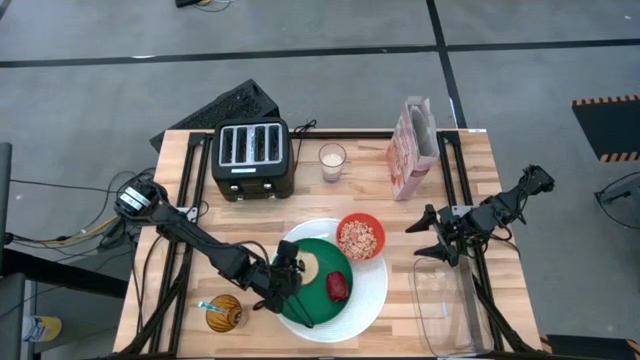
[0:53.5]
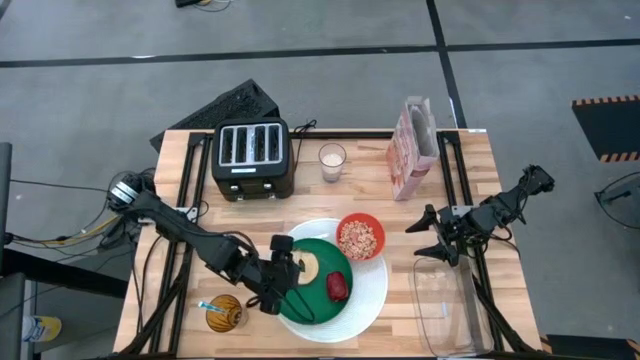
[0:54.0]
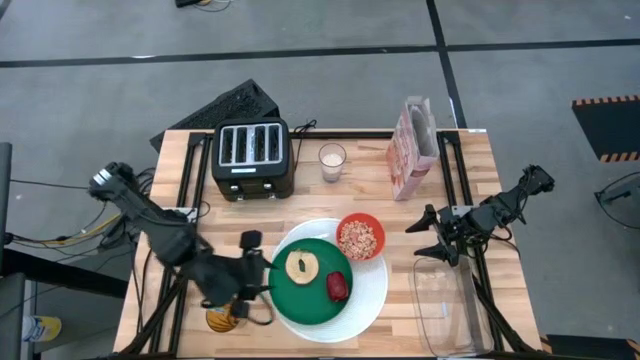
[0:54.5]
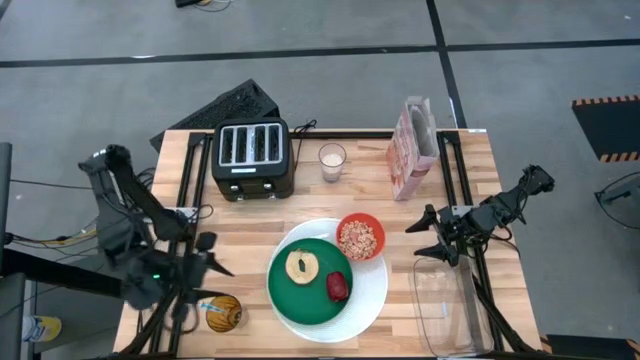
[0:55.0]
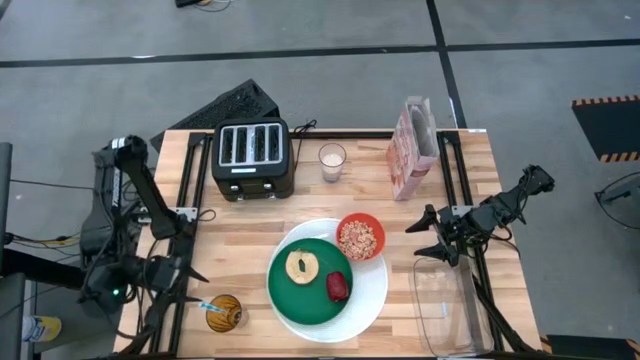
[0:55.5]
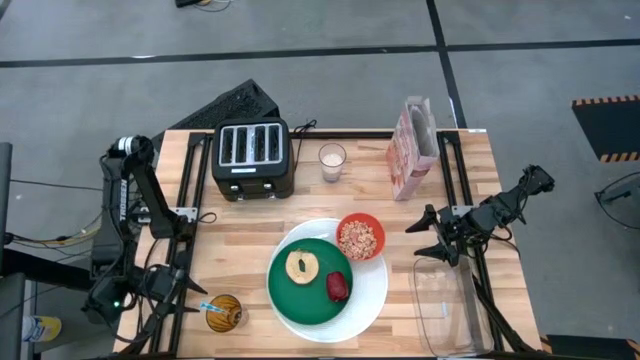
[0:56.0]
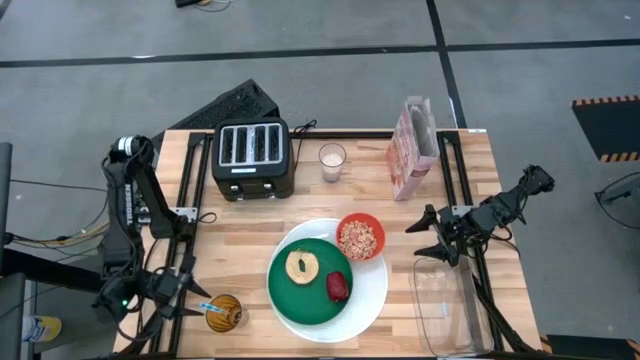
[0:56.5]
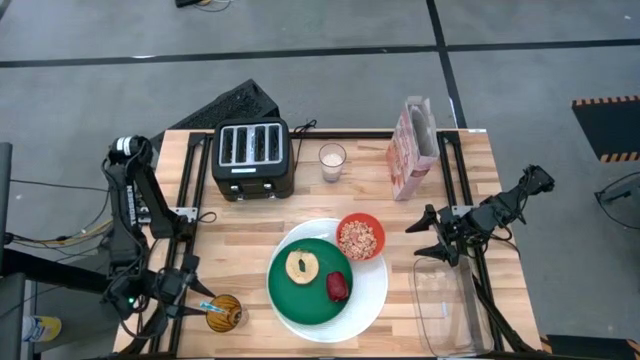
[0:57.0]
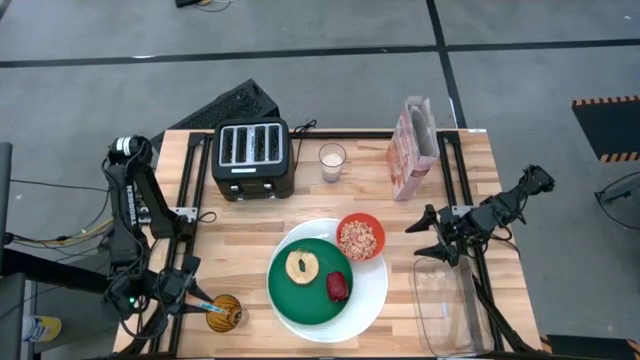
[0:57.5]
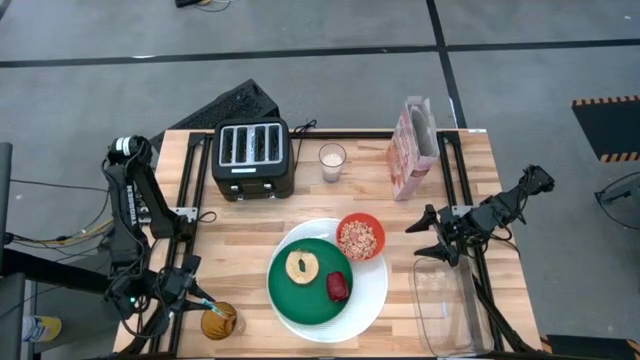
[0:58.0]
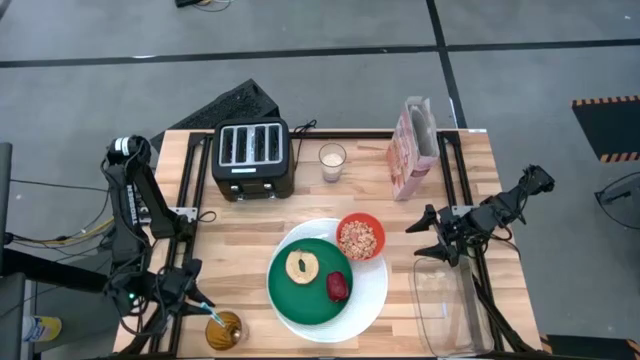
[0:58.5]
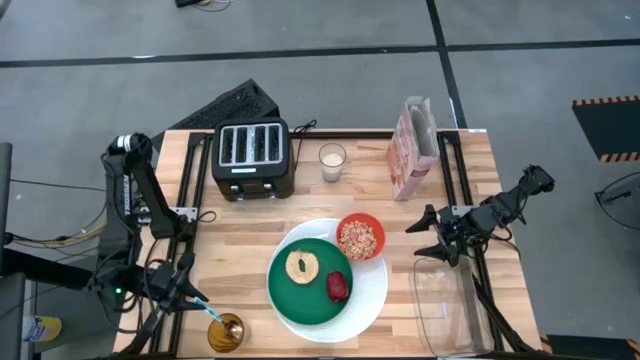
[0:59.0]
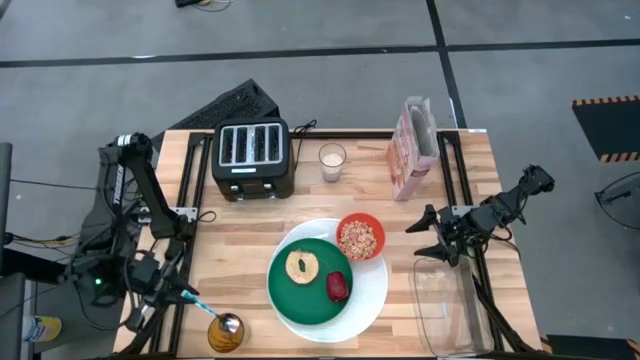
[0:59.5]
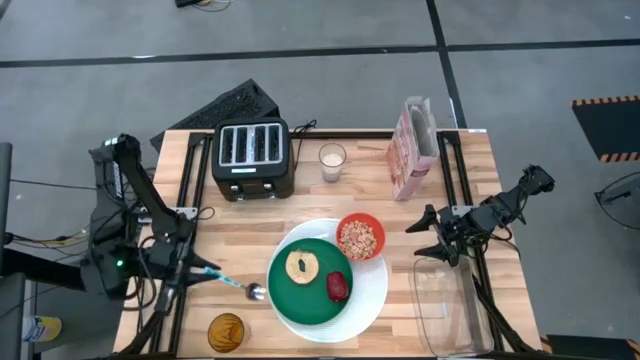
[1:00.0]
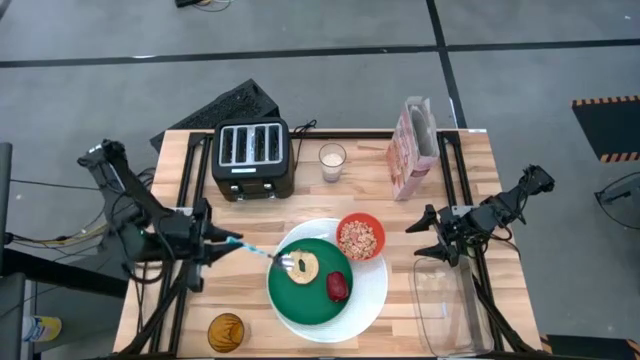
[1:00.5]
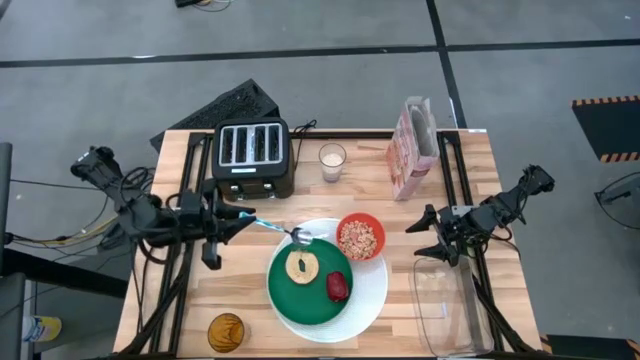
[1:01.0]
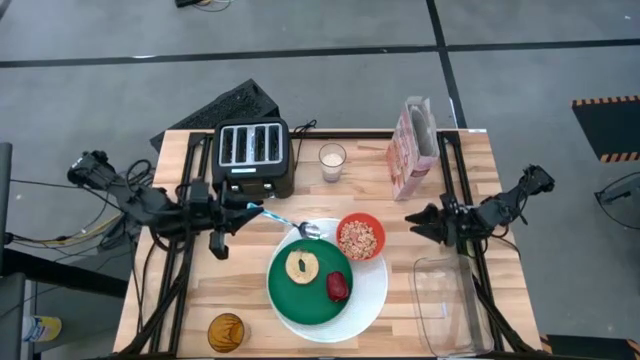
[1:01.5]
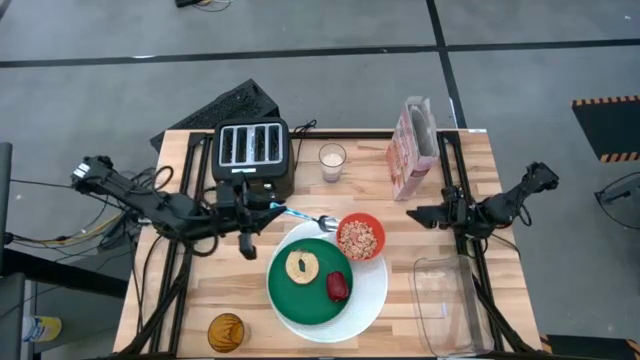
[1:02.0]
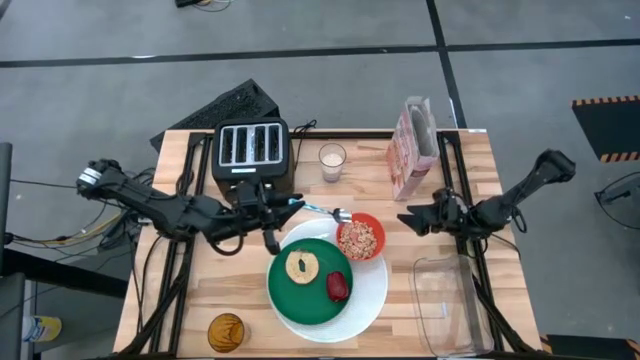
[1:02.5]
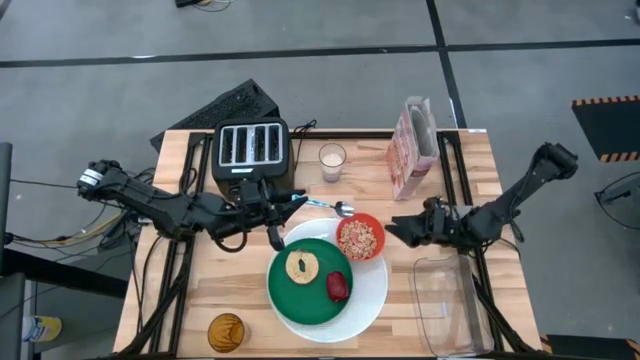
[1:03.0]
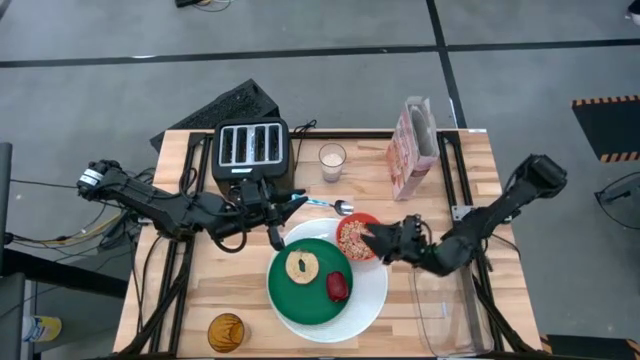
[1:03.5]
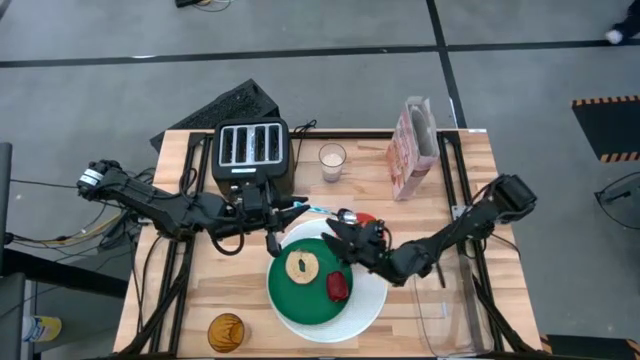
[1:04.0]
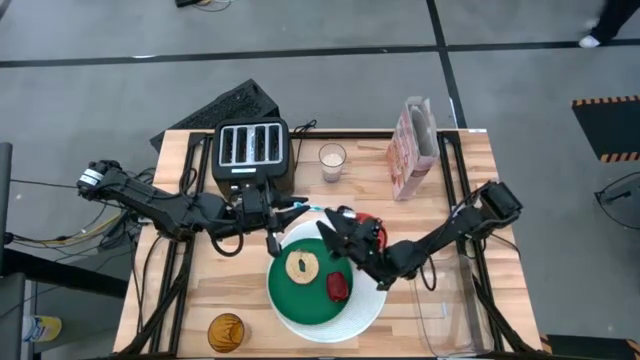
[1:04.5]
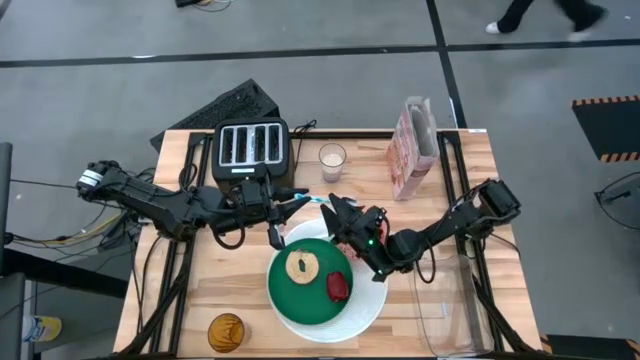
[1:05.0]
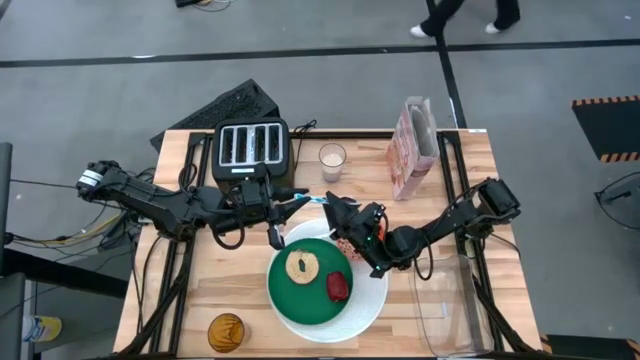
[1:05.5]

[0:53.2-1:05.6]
Task: Arrange a breakfast setting
Put the spoon on the right side of the plate on the white table mat

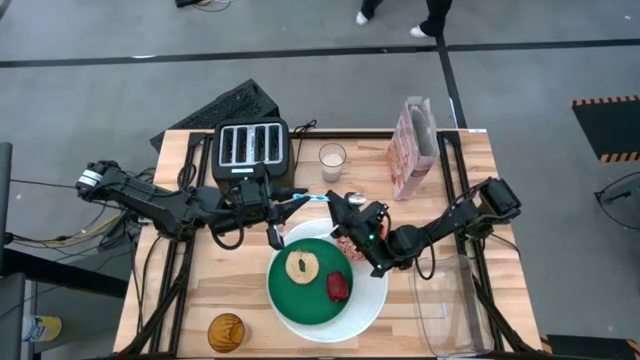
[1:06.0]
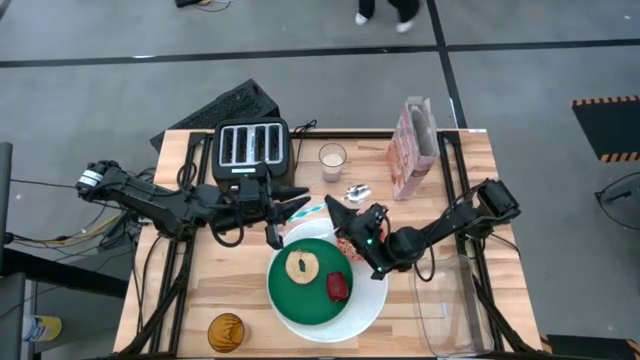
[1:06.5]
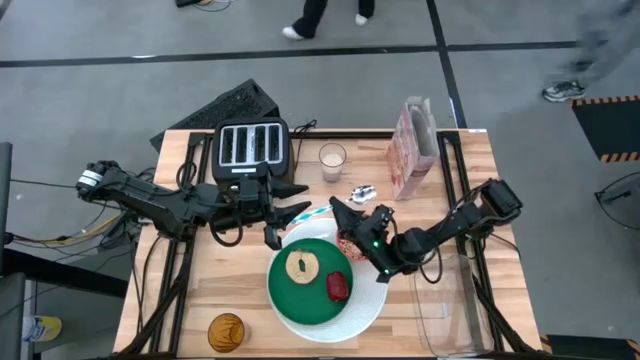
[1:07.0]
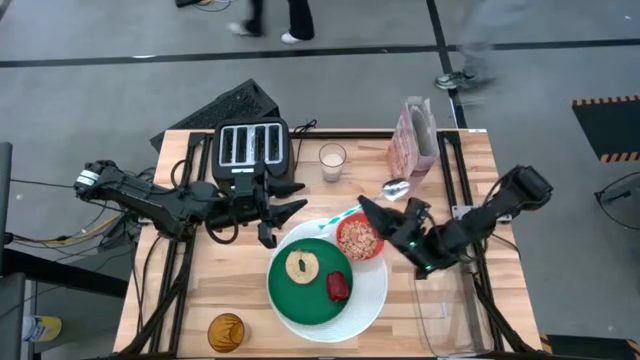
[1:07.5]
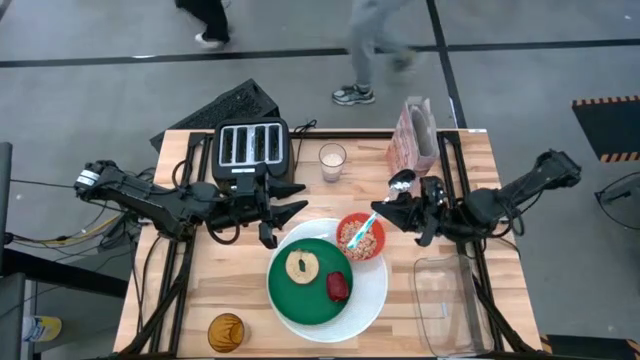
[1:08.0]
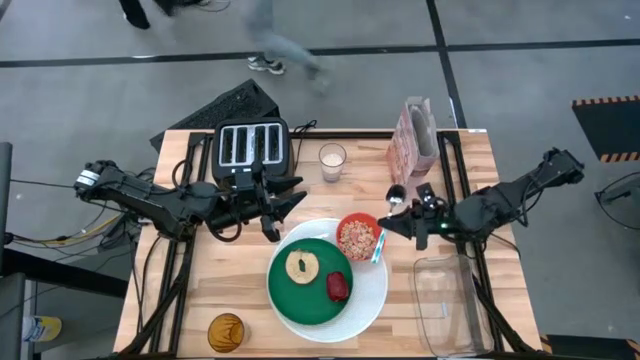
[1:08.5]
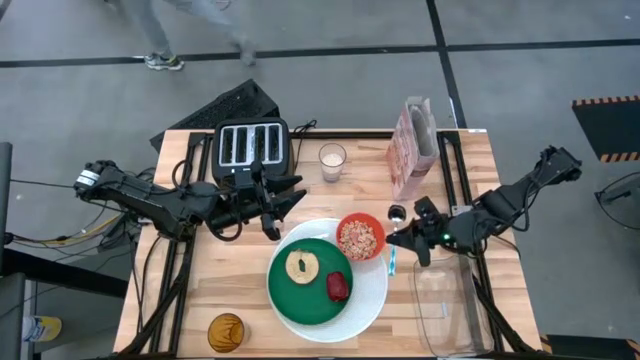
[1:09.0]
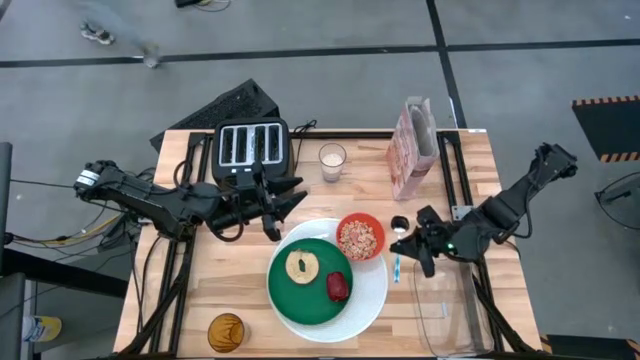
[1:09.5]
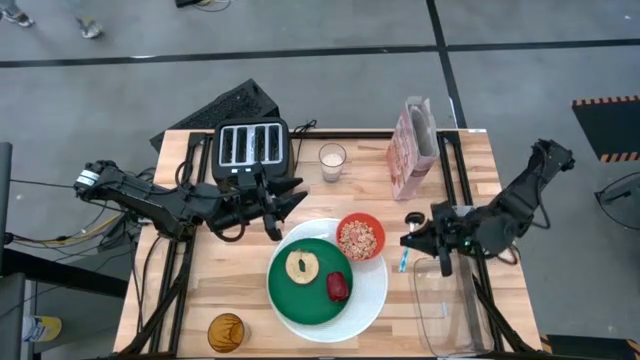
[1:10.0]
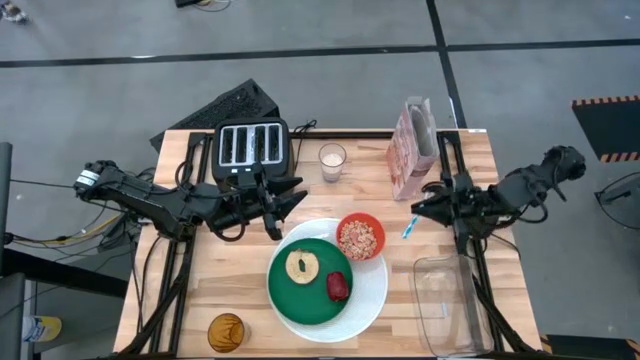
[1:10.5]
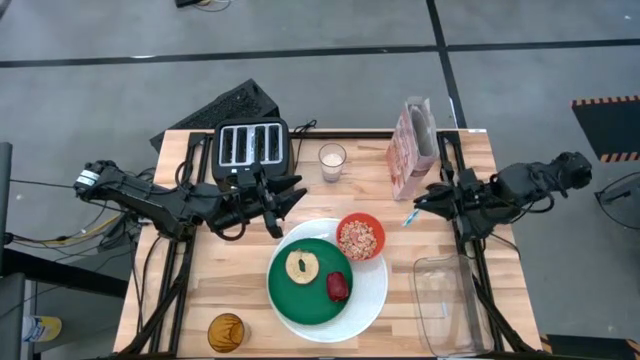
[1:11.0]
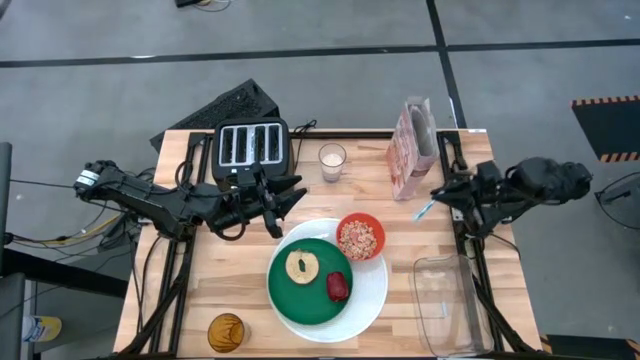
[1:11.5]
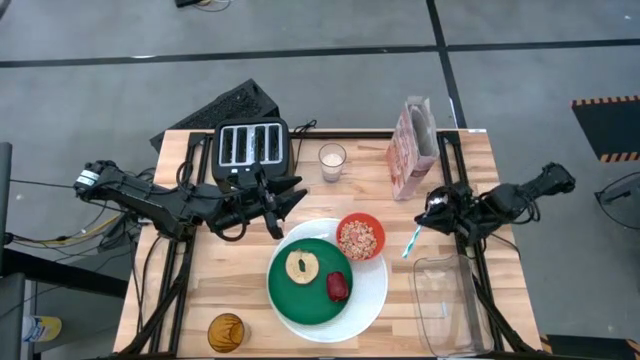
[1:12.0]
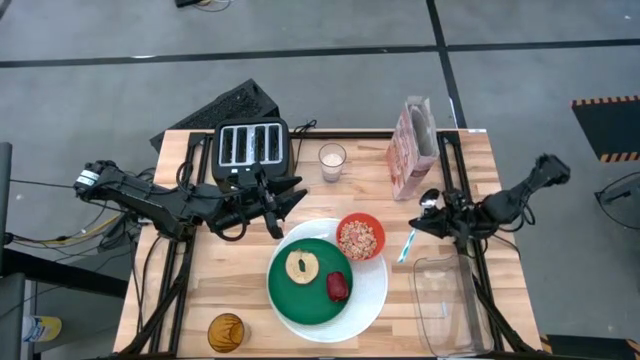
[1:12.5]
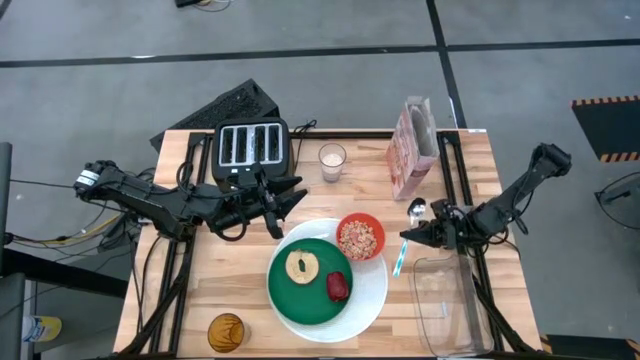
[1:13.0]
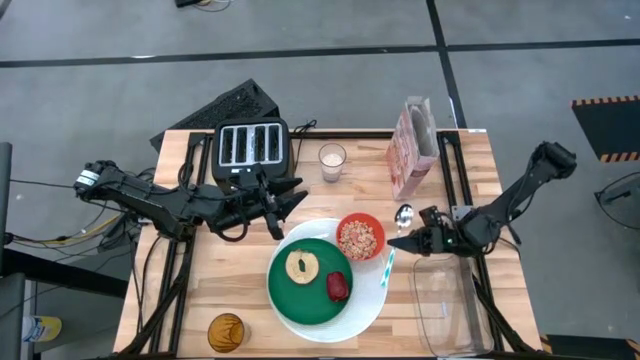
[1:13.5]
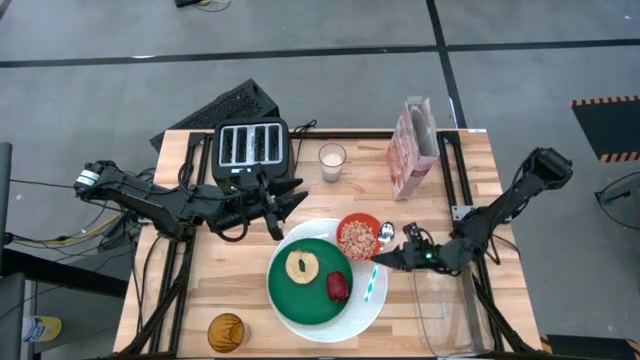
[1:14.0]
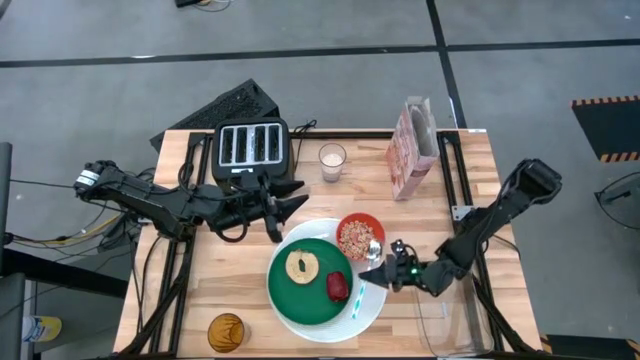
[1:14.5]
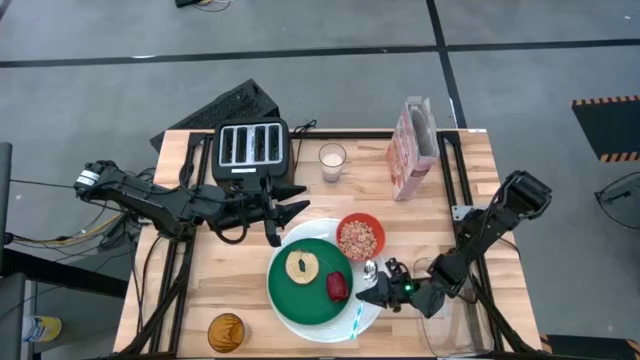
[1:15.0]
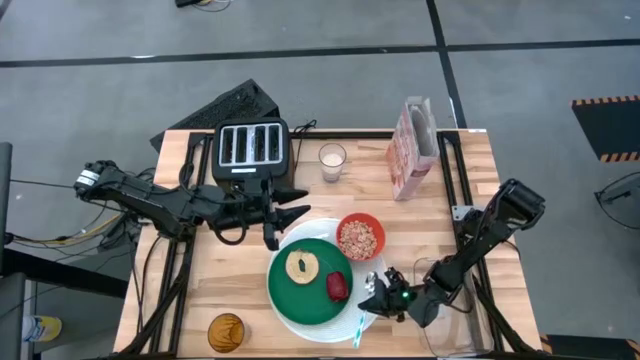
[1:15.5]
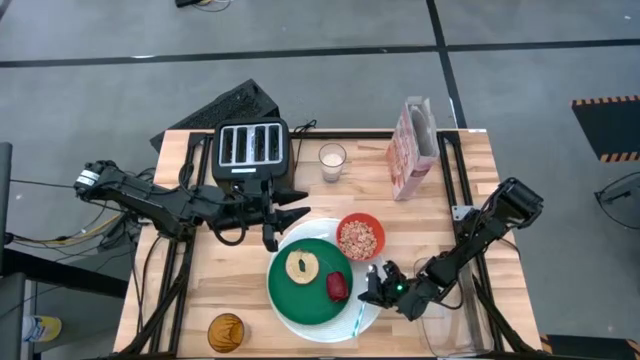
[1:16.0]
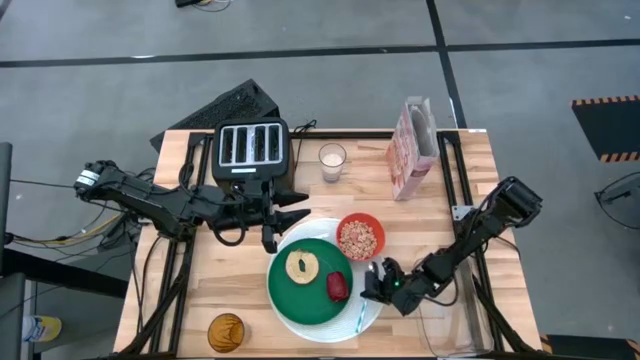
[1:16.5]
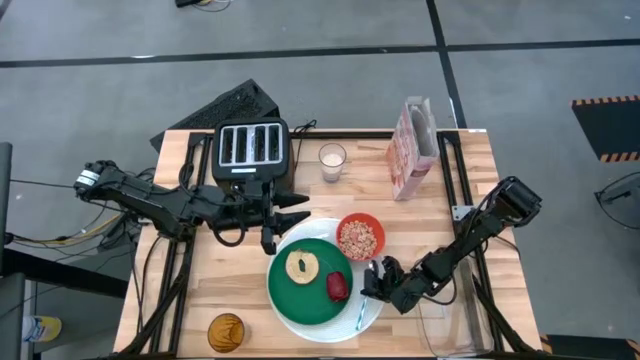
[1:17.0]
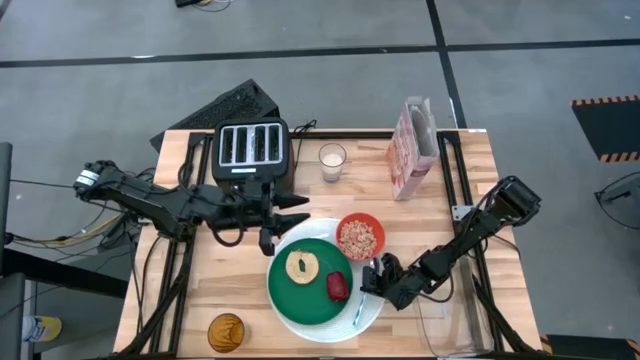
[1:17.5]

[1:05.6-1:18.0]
Put the spoon on the right side of the plate on the white table mat
